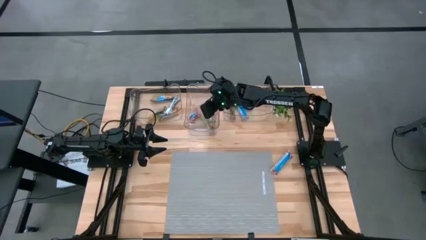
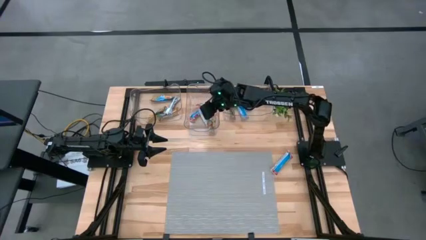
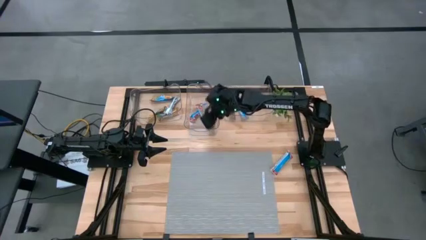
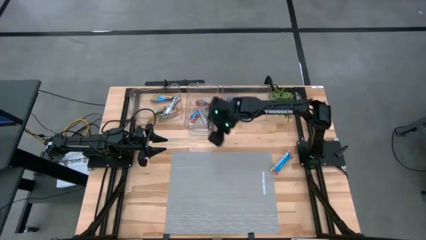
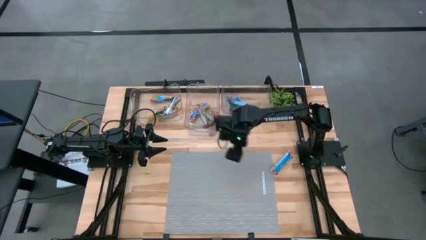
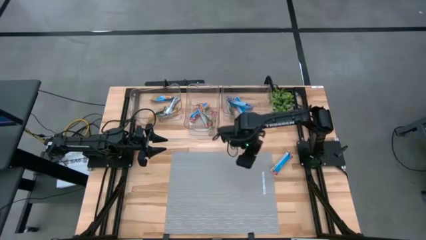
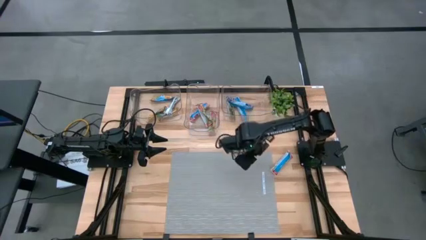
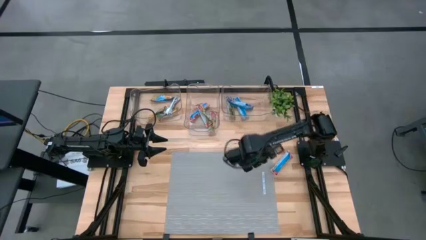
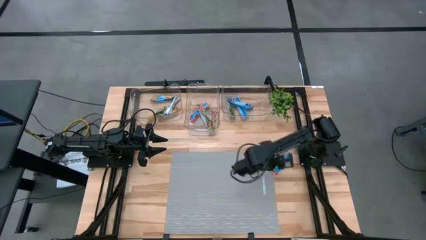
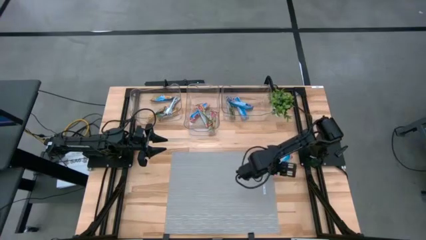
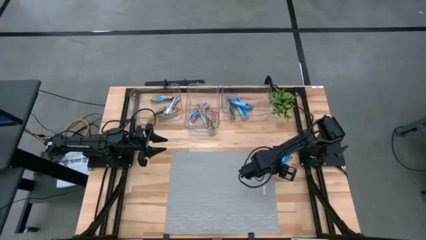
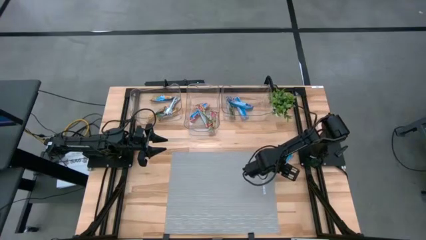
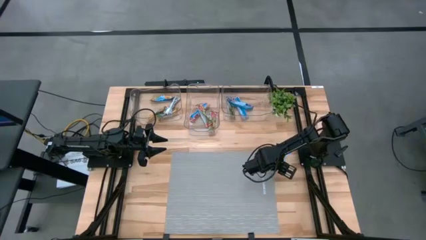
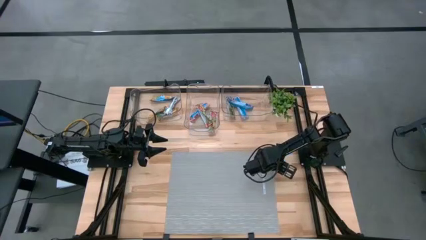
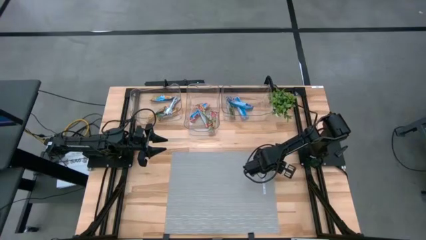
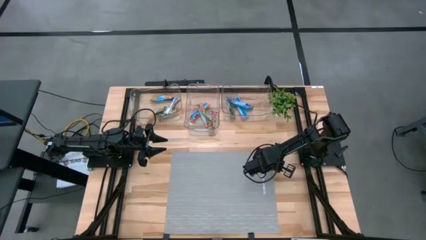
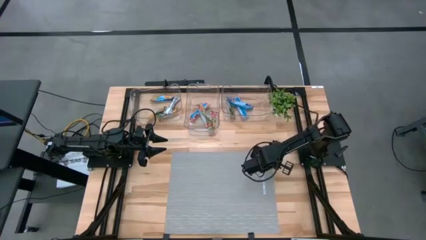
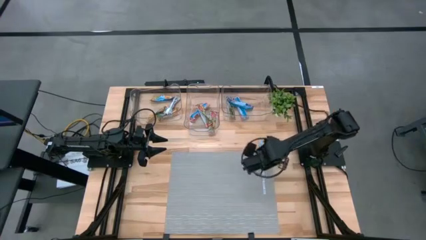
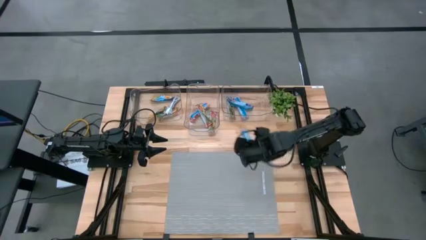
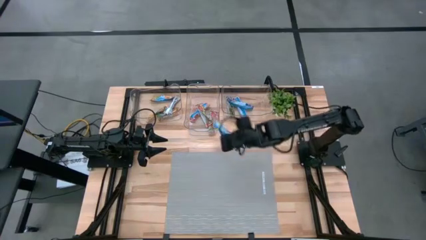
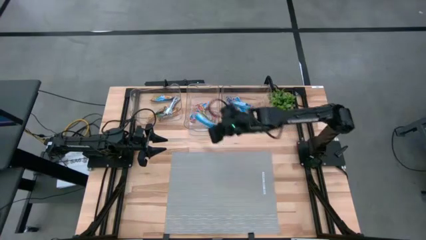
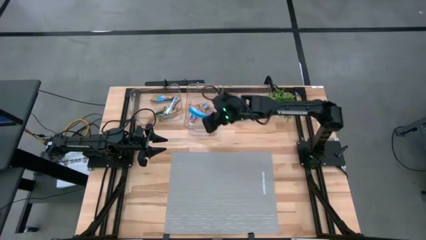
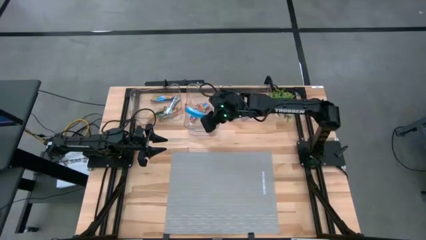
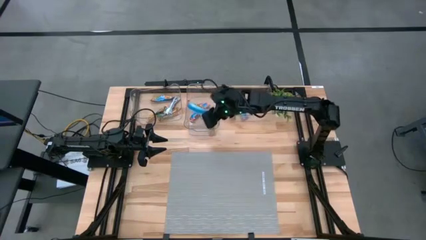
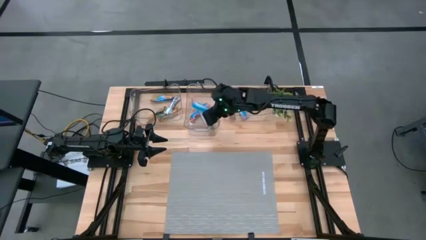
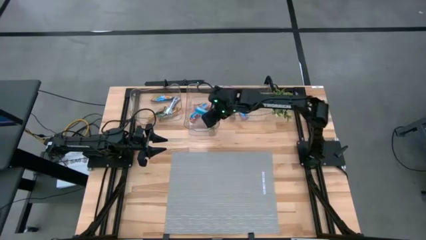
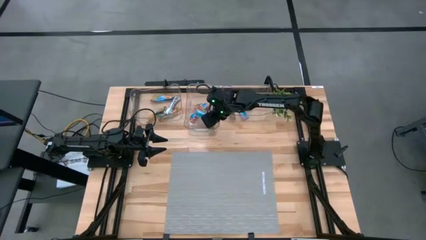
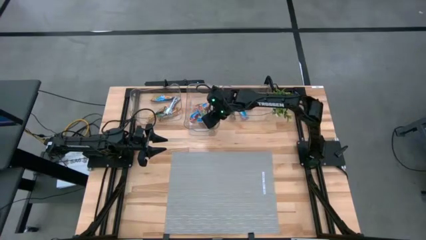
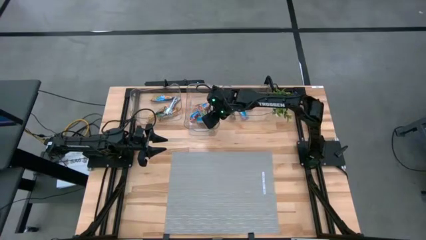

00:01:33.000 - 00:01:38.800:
Task: Pick and place Granola Bars by type
Put the red granola bar into the middle transparent bin

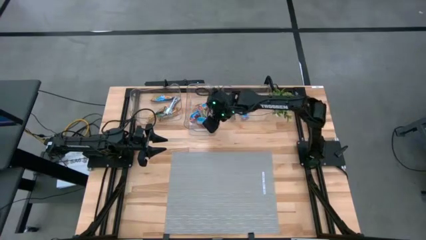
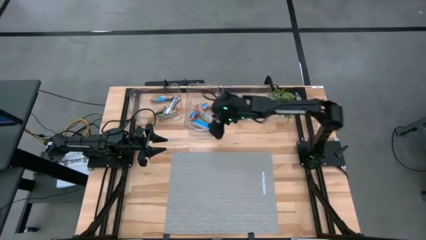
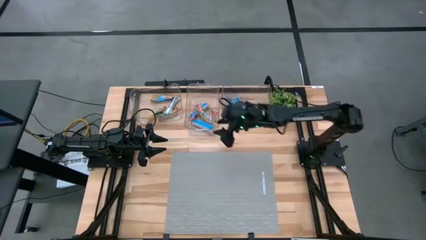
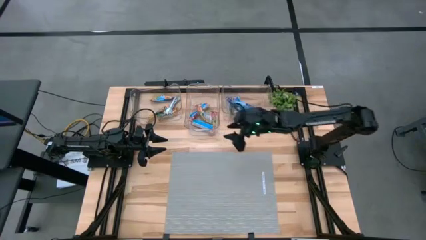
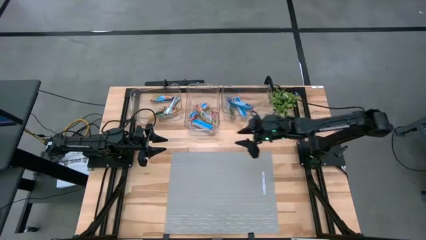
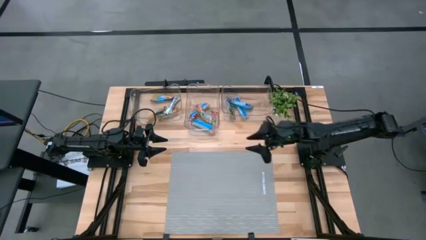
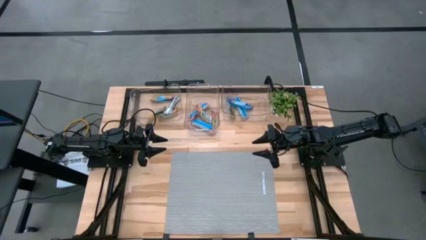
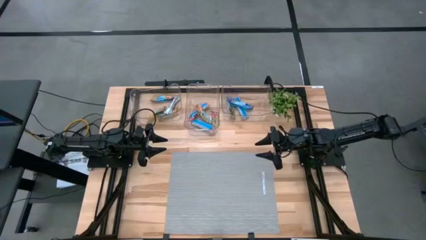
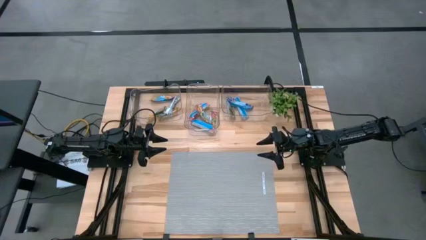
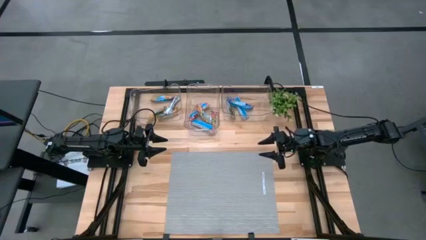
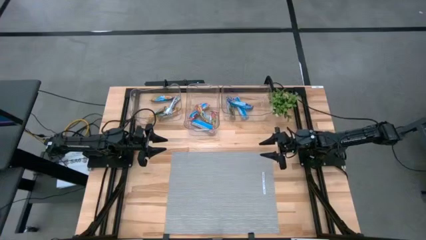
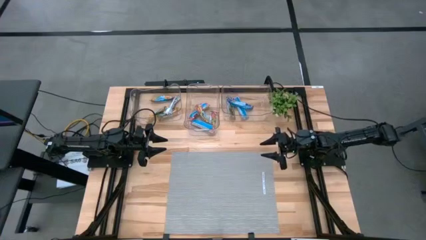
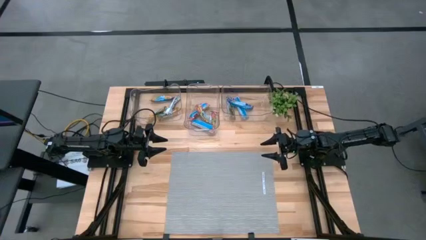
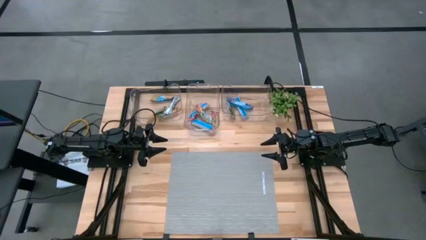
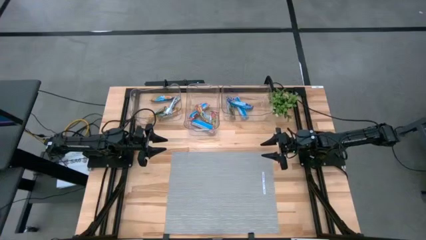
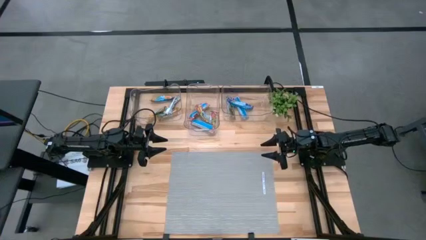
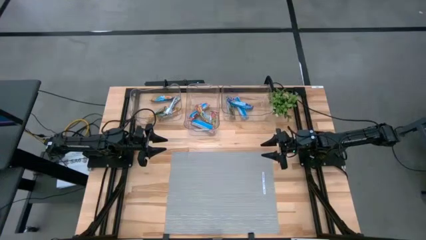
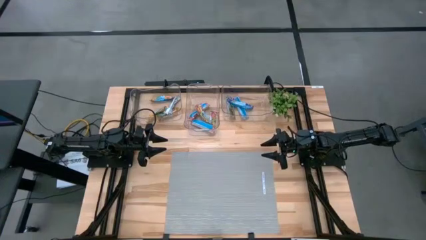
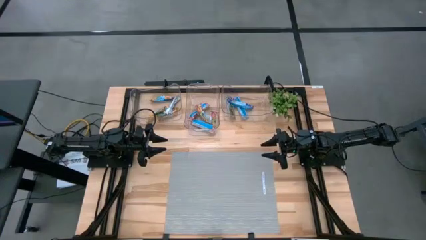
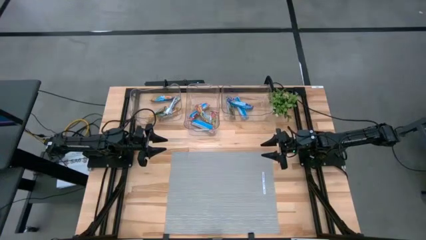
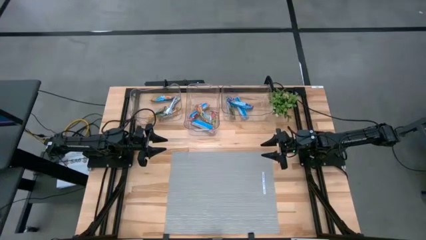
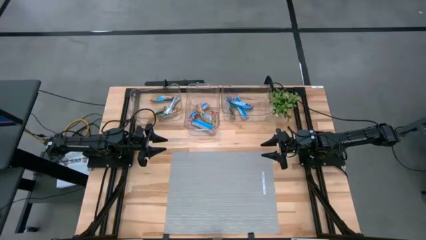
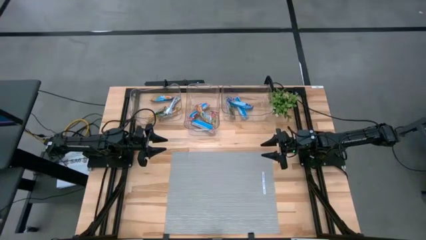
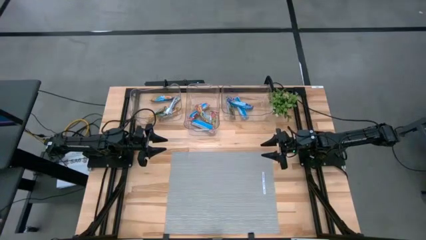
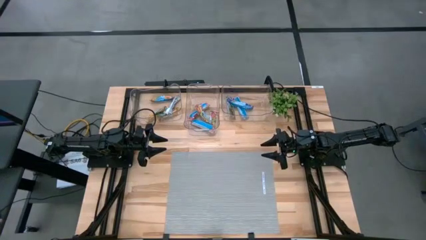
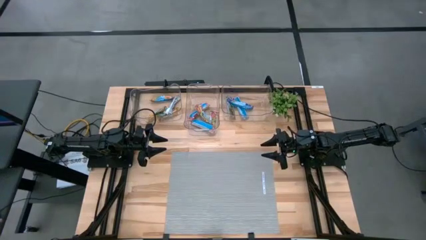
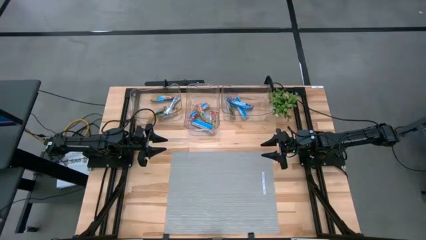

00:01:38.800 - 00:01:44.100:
Return to Home Position

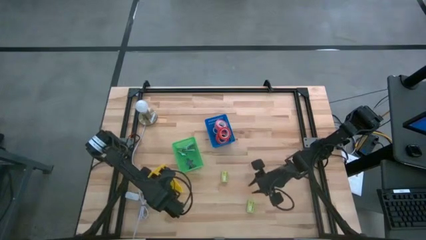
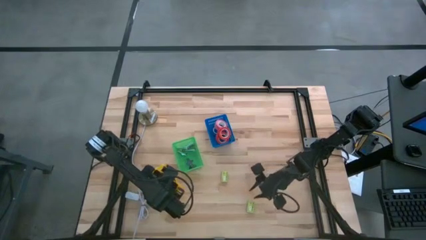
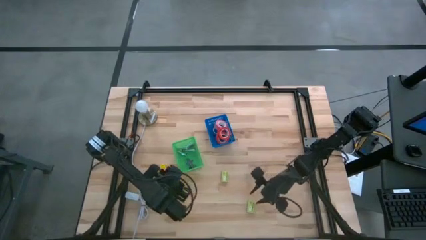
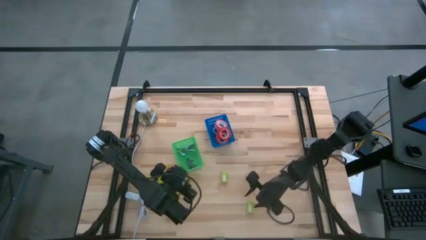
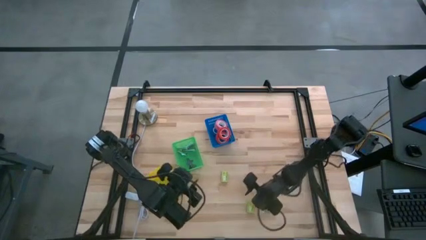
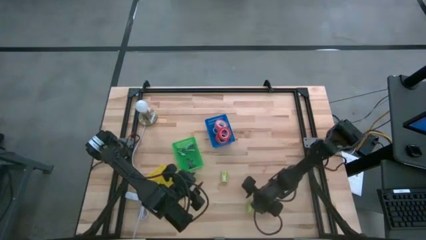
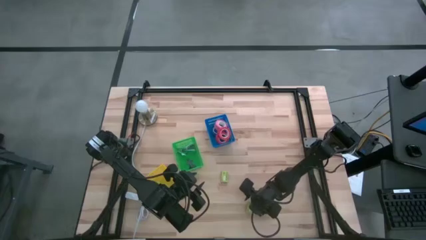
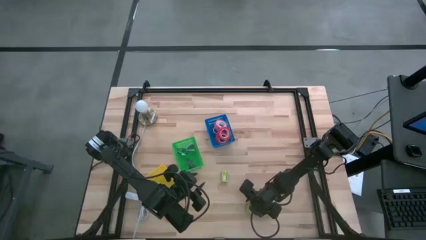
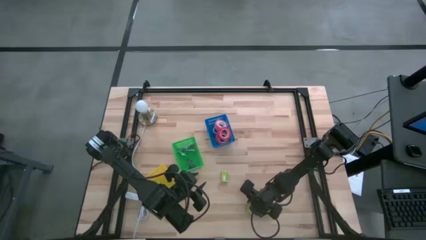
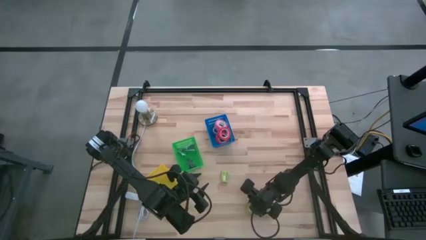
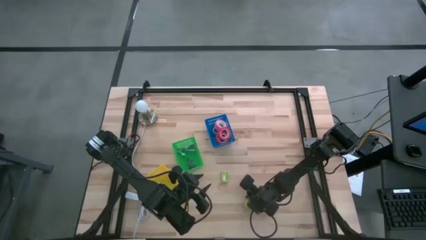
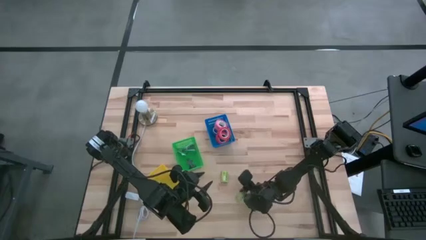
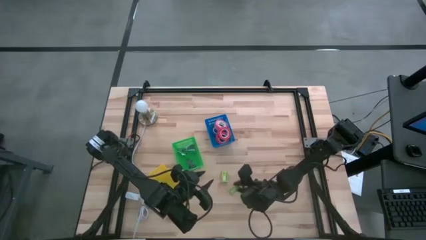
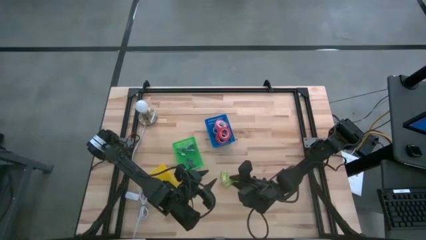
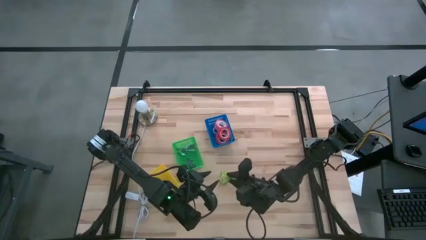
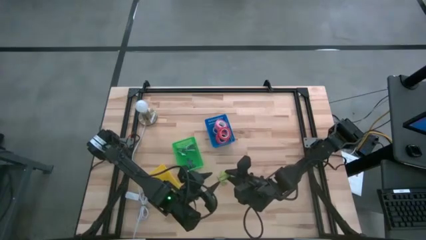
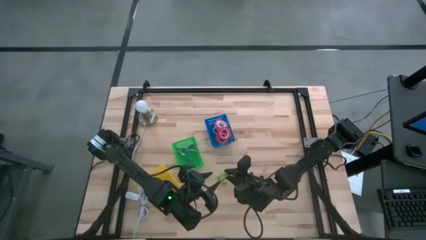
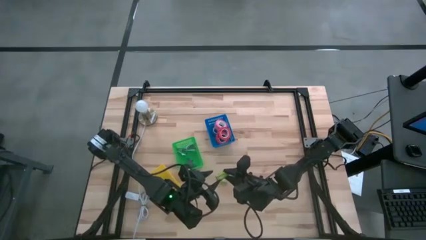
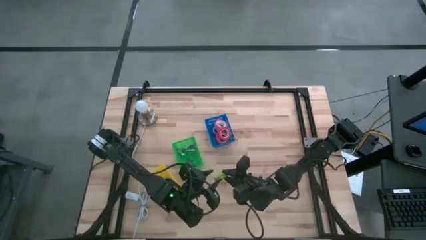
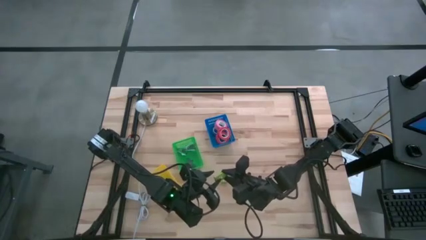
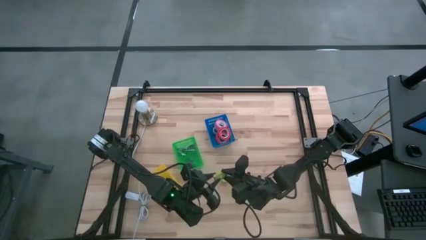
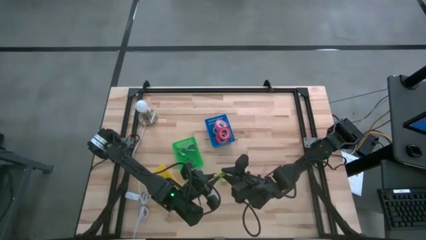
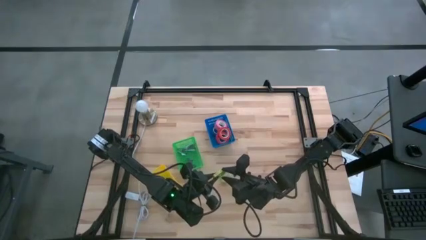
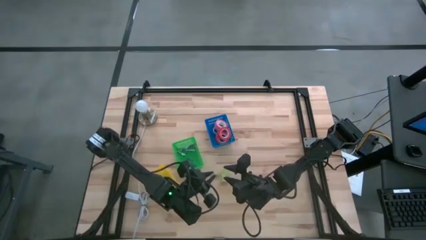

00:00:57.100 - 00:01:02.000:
Task: Pick and place Stapler, Stapler remover, tape
Put the bottom green staple box into the yellow basket
